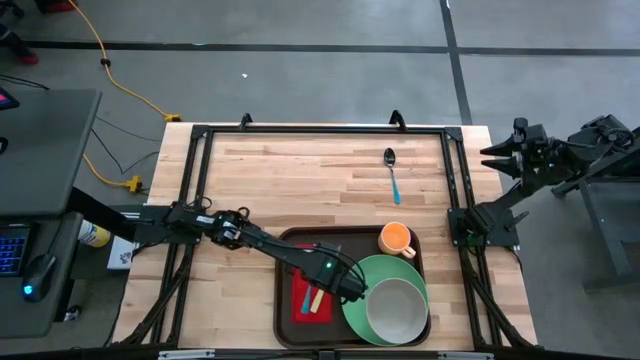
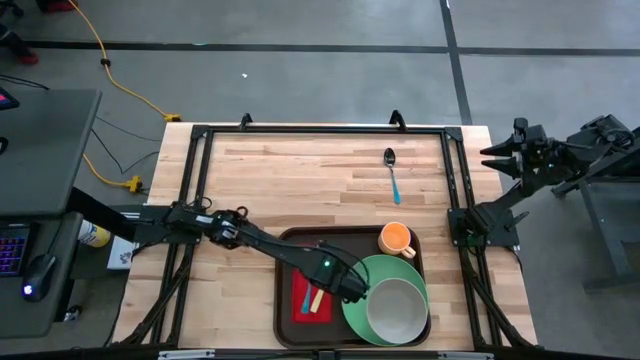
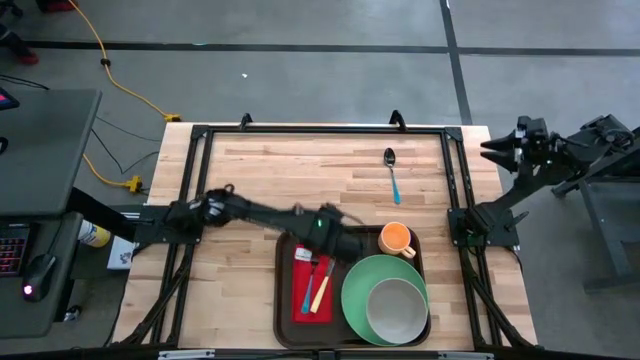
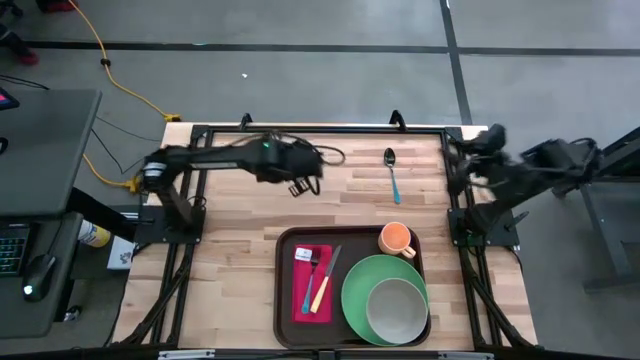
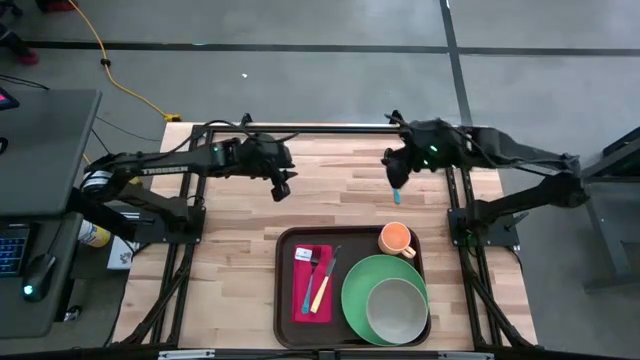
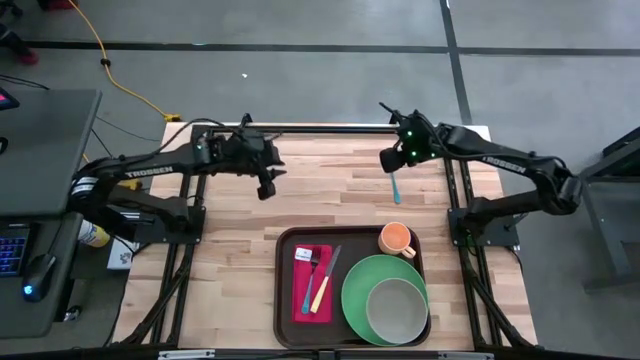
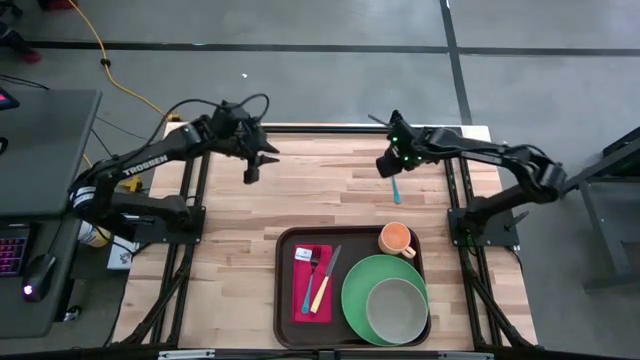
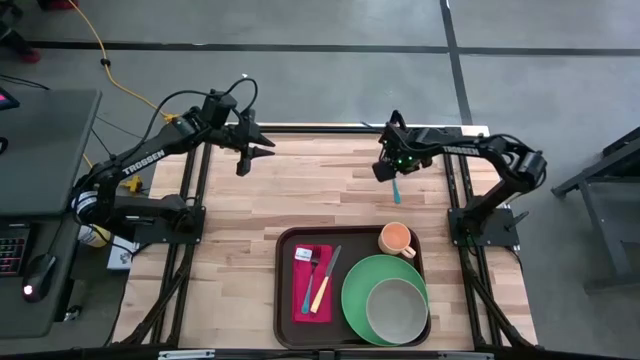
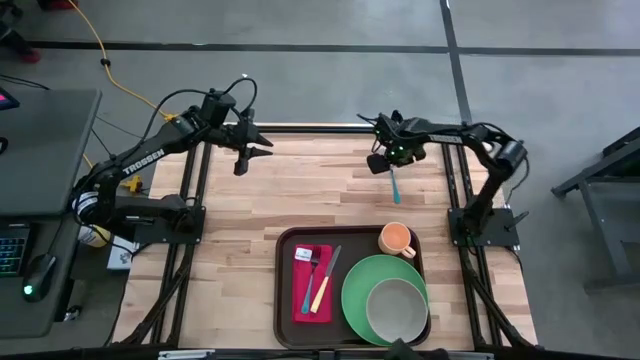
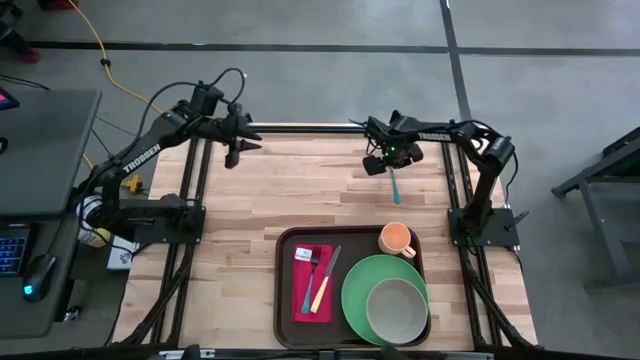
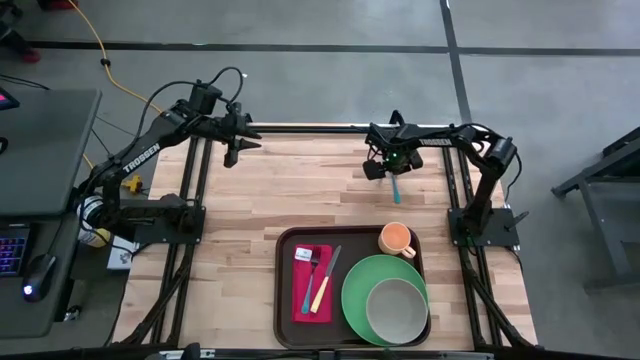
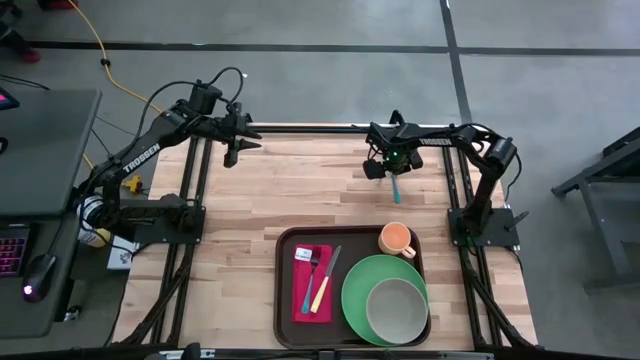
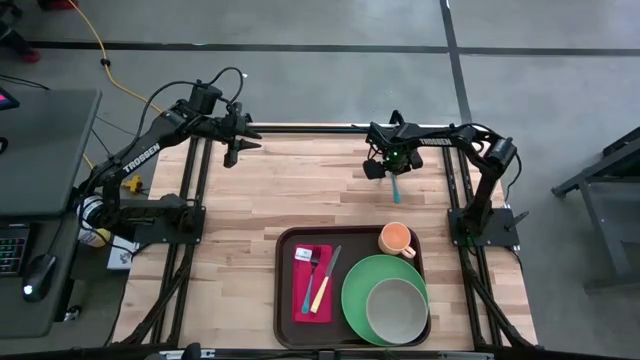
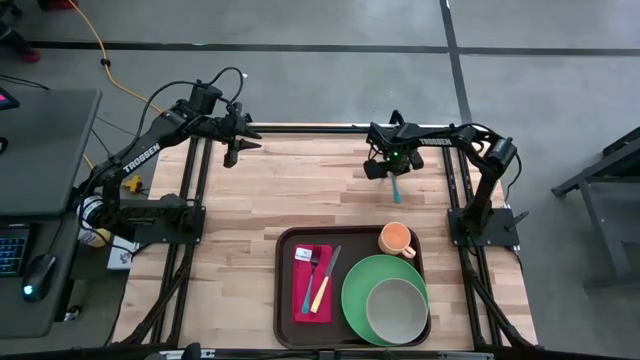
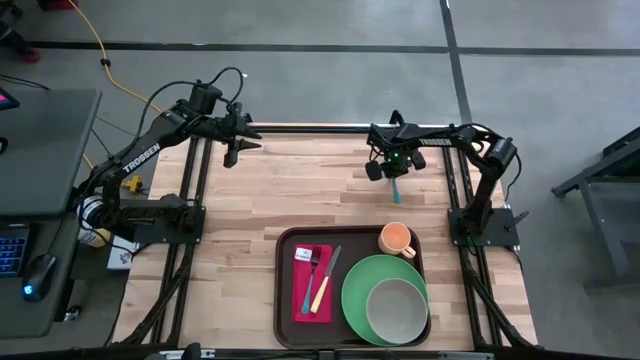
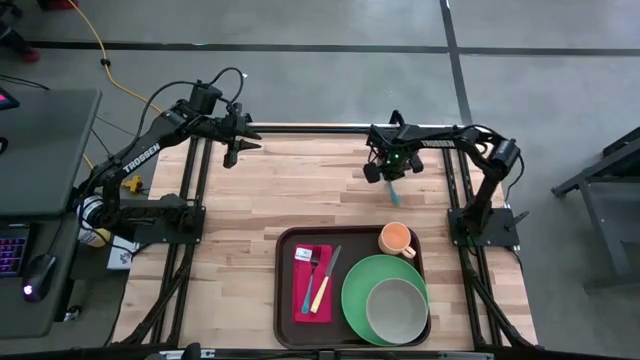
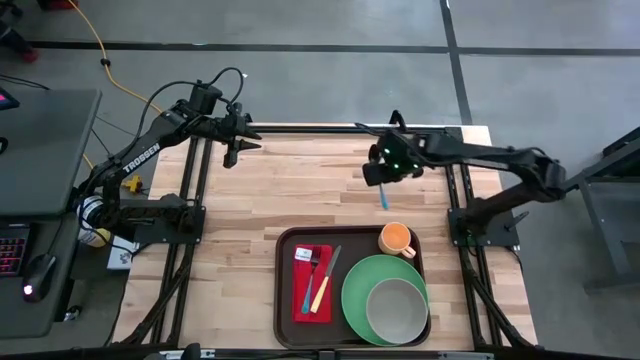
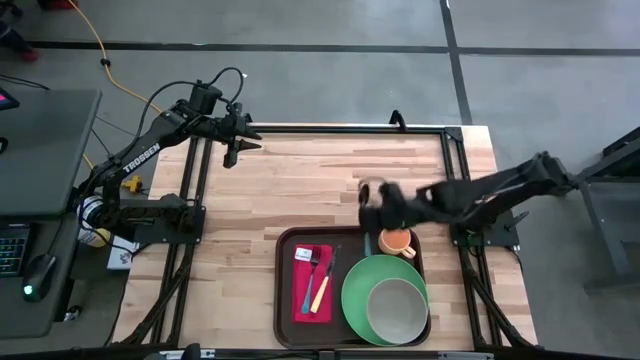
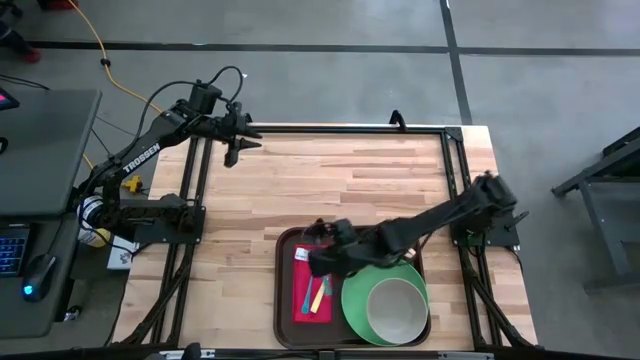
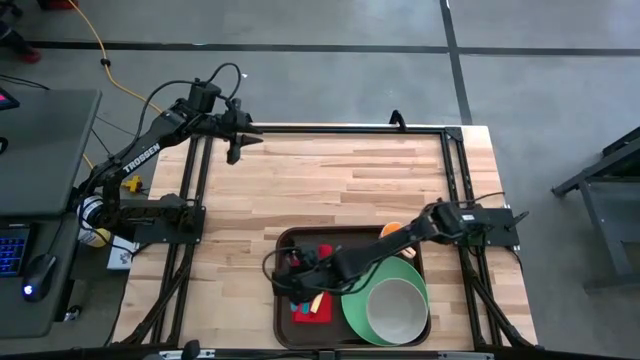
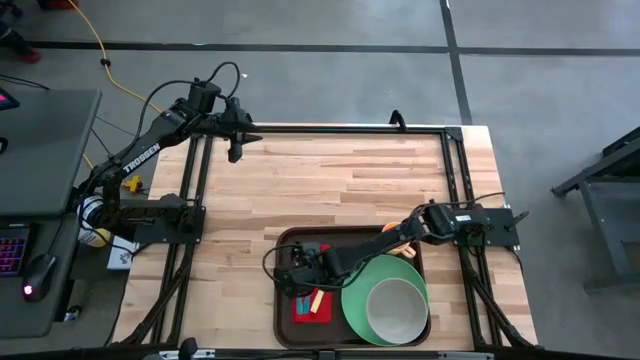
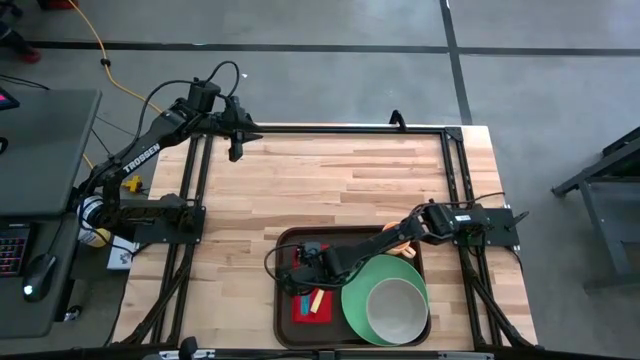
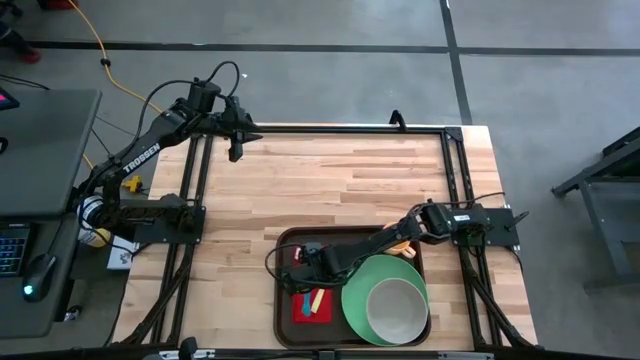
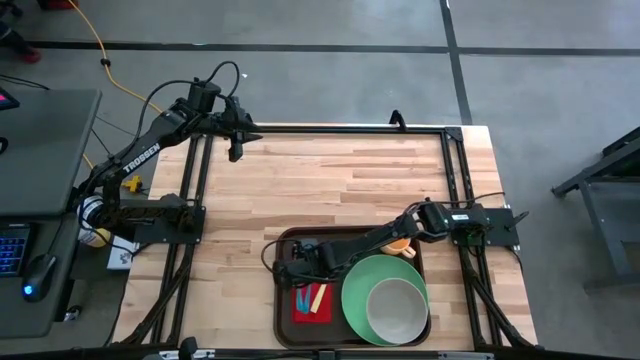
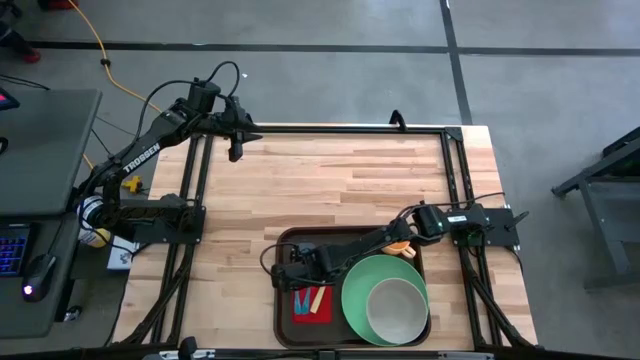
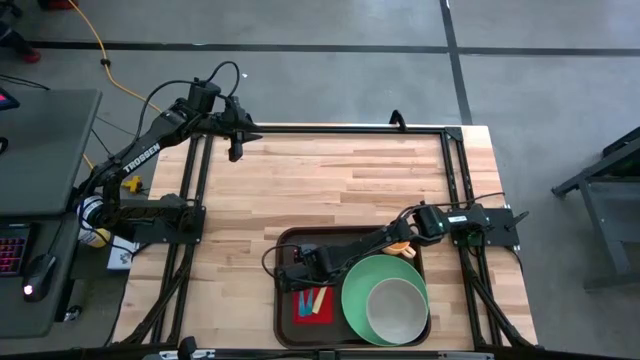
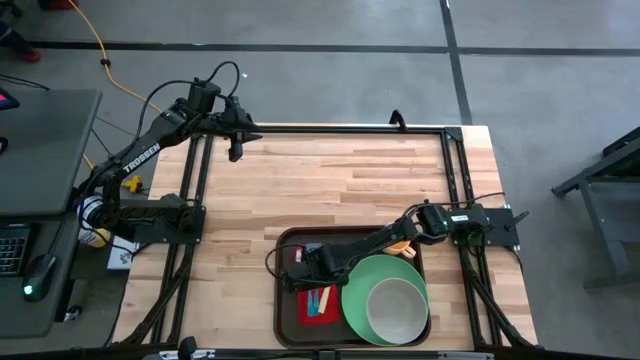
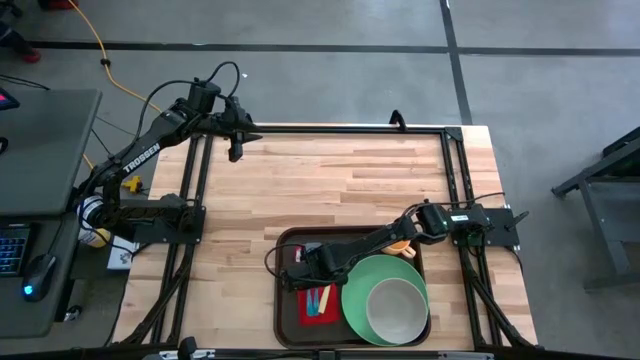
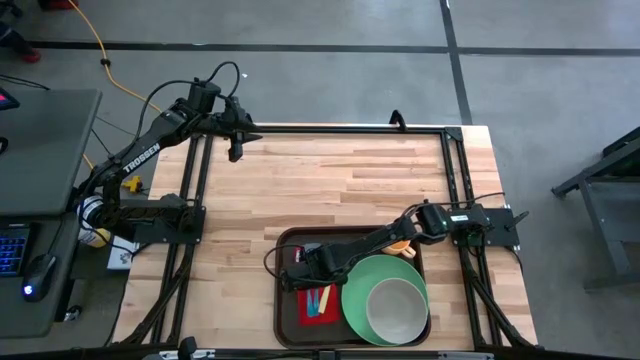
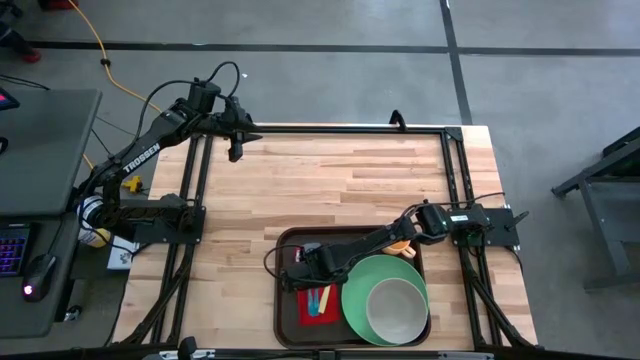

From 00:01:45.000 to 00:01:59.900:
Task: Set up tray
Put the blue spoon on the top of red cloth table napkin

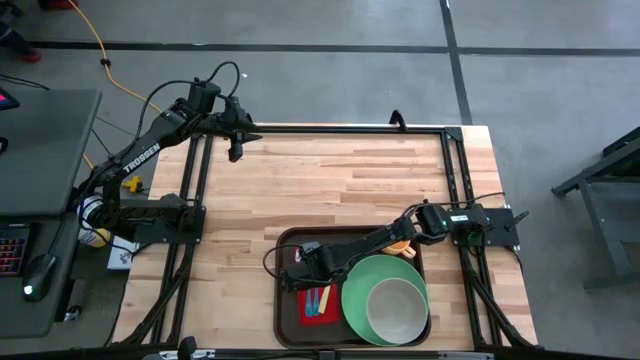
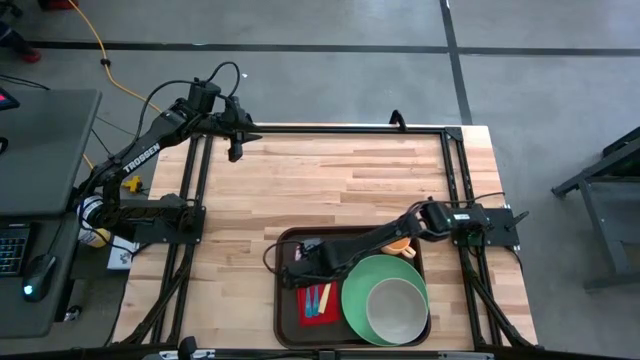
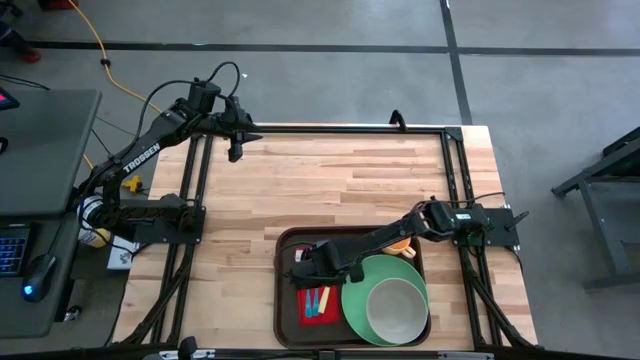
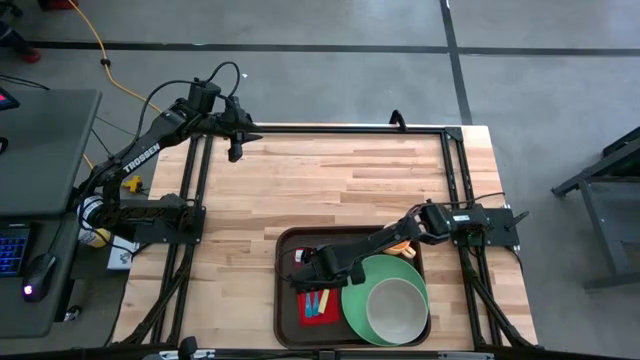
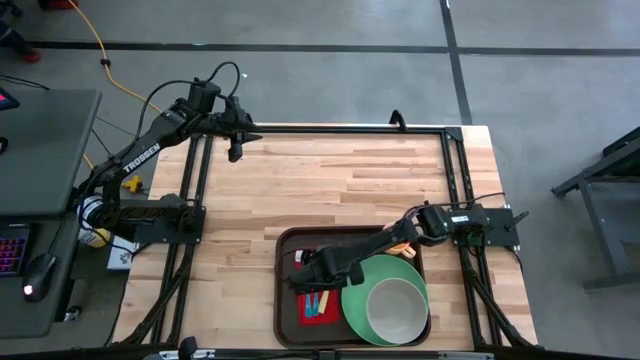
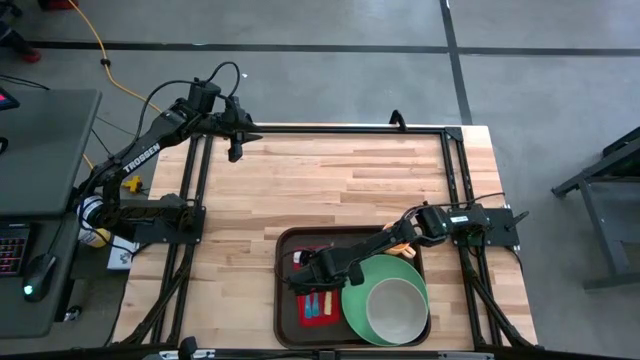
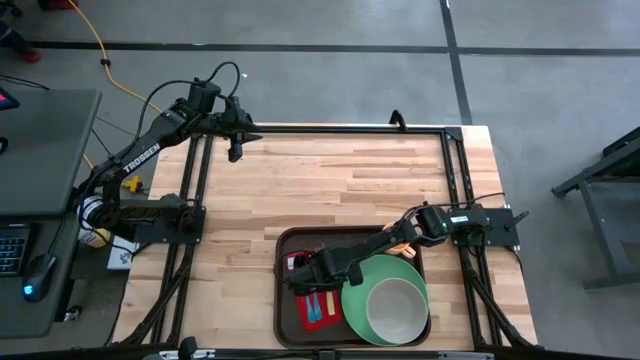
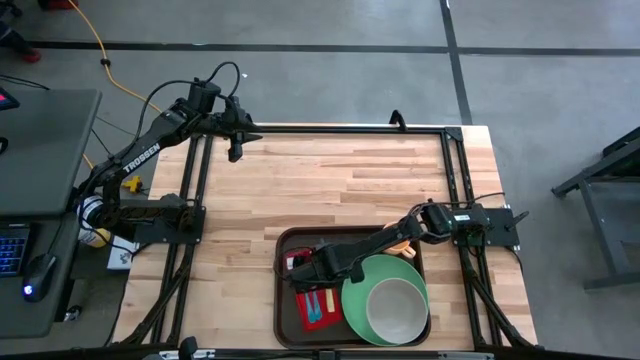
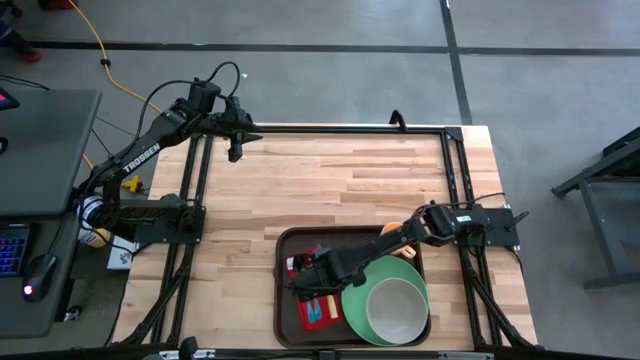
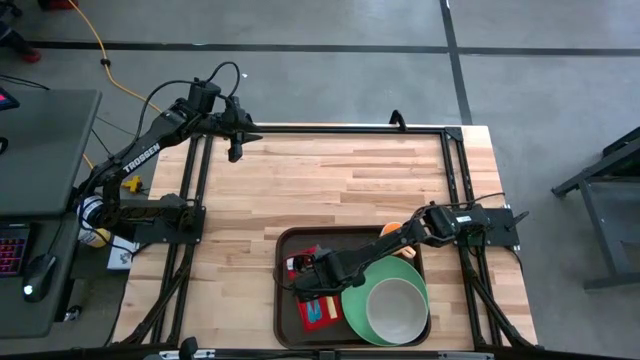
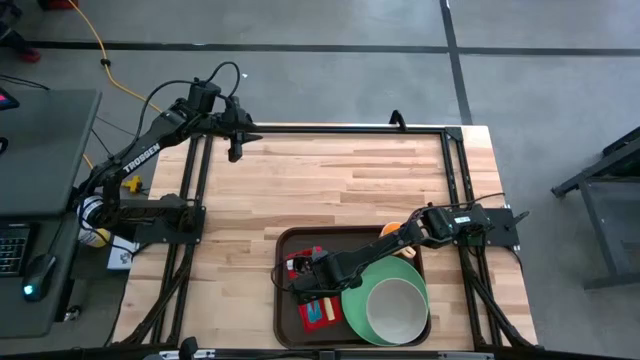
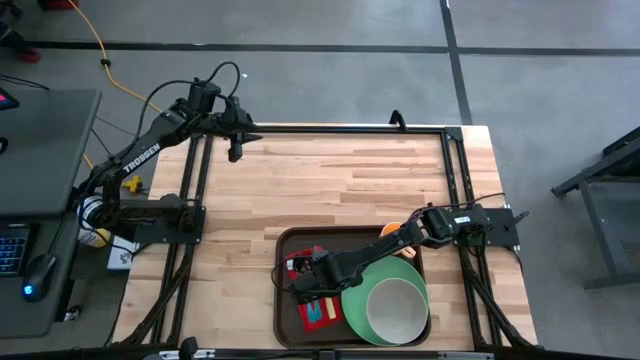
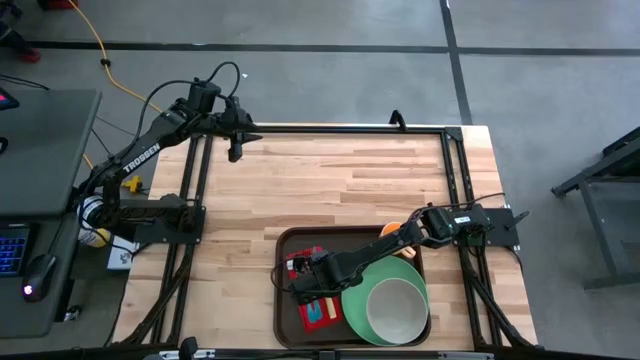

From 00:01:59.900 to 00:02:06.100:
Adjust the yellow knife
